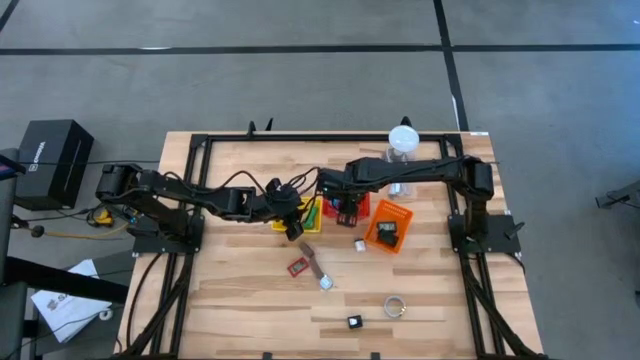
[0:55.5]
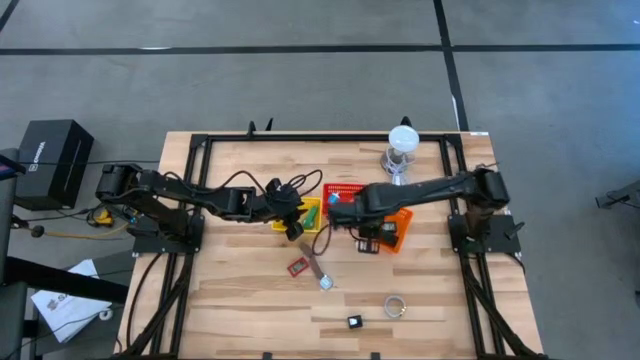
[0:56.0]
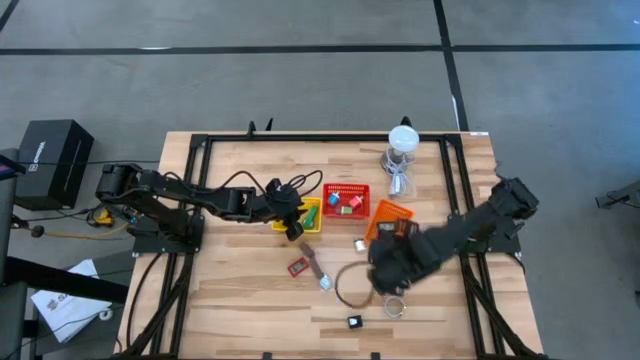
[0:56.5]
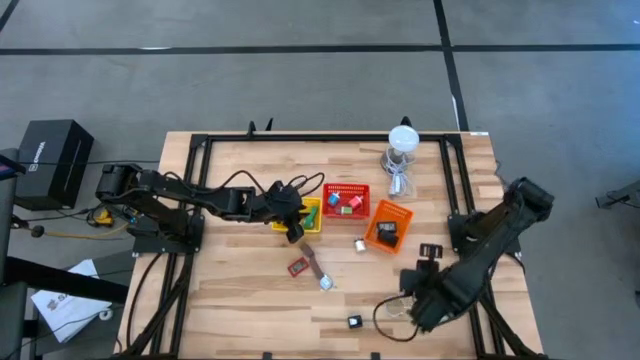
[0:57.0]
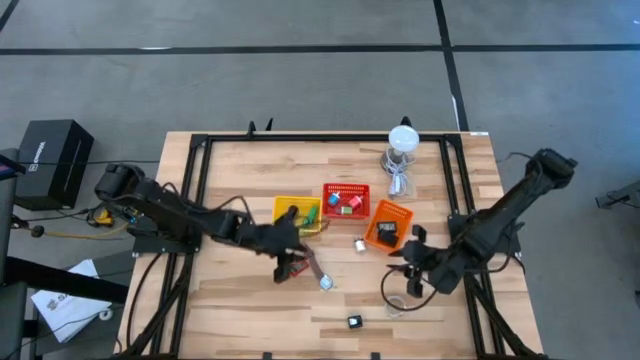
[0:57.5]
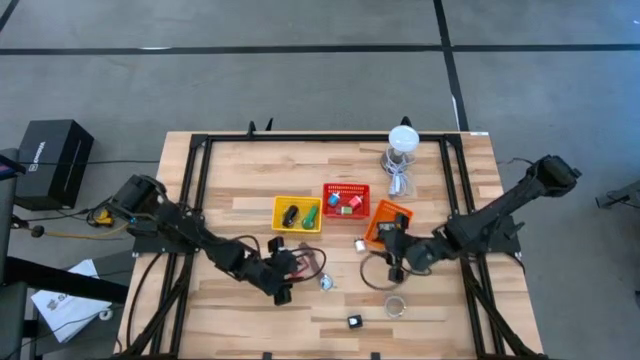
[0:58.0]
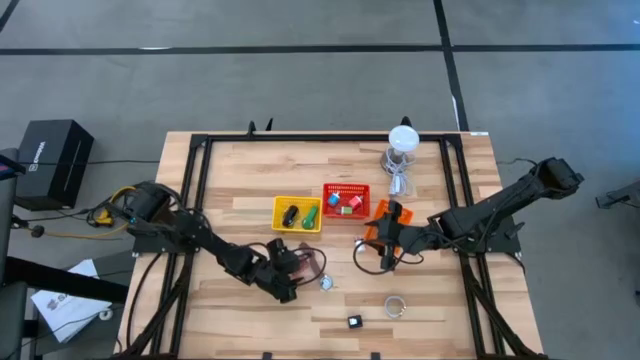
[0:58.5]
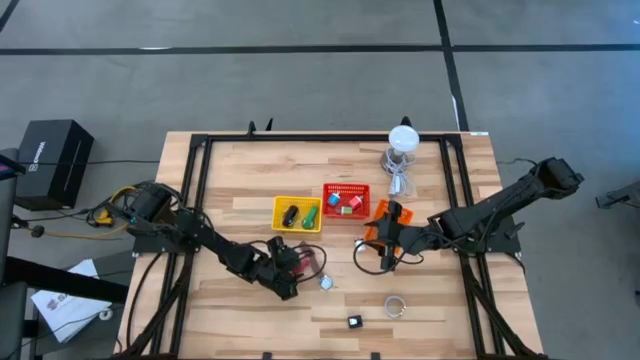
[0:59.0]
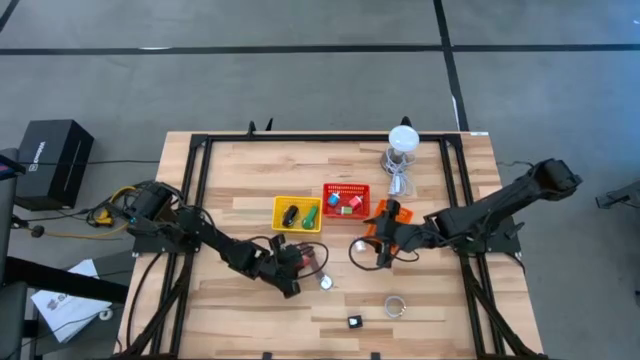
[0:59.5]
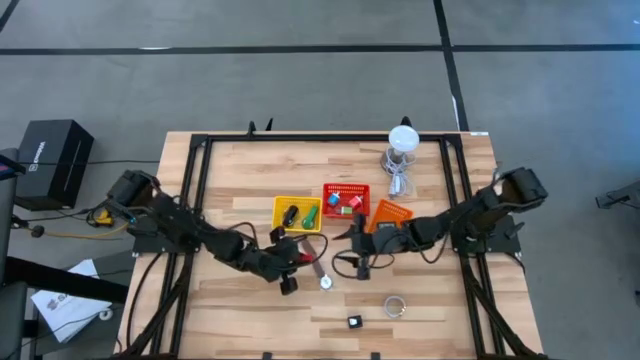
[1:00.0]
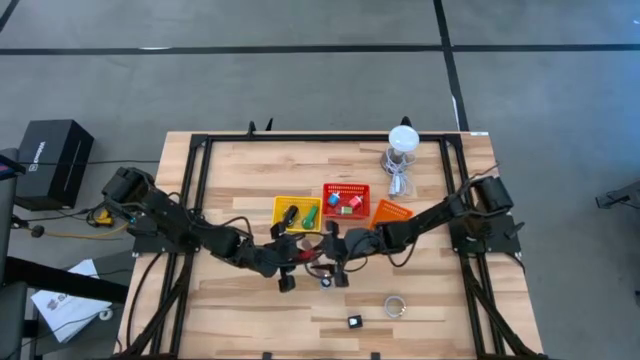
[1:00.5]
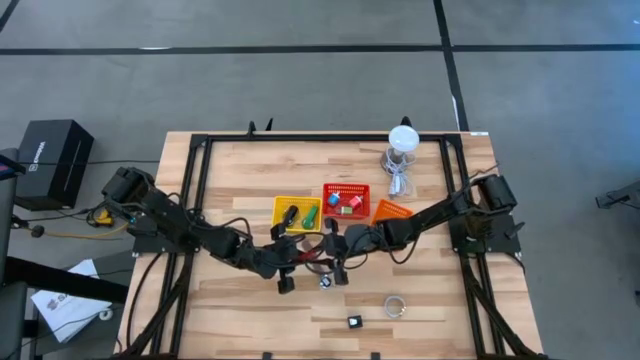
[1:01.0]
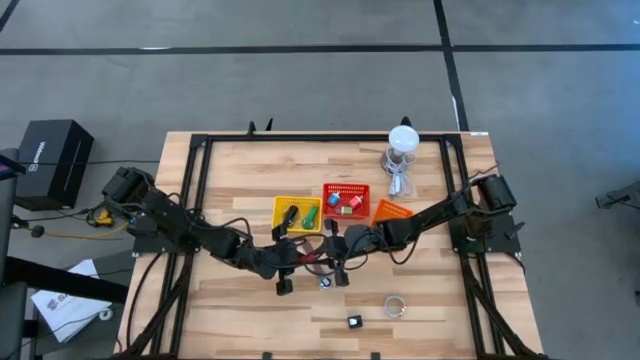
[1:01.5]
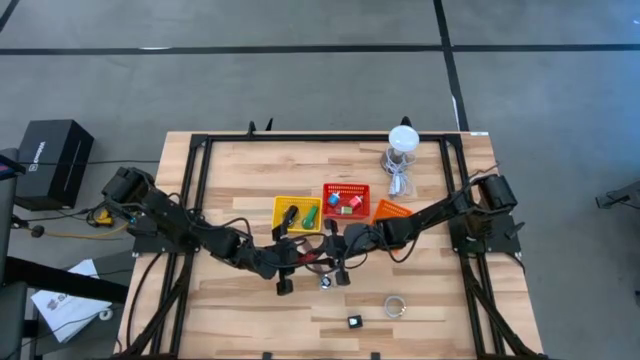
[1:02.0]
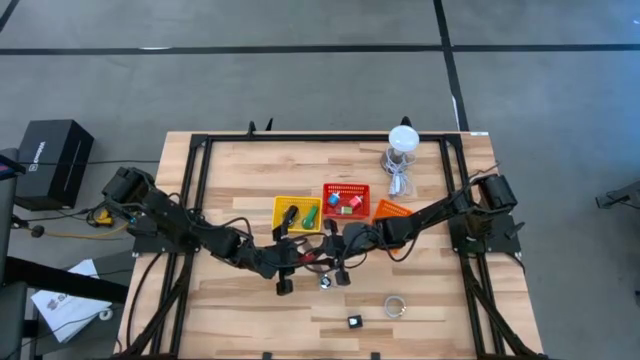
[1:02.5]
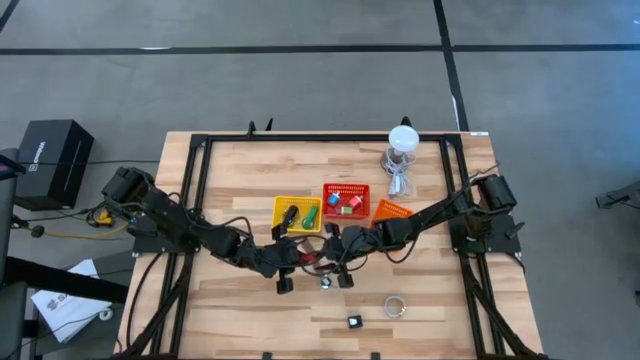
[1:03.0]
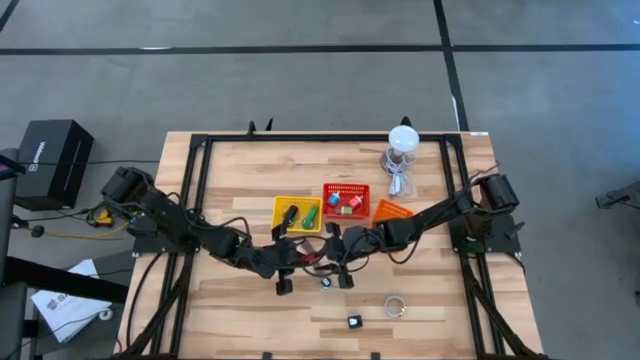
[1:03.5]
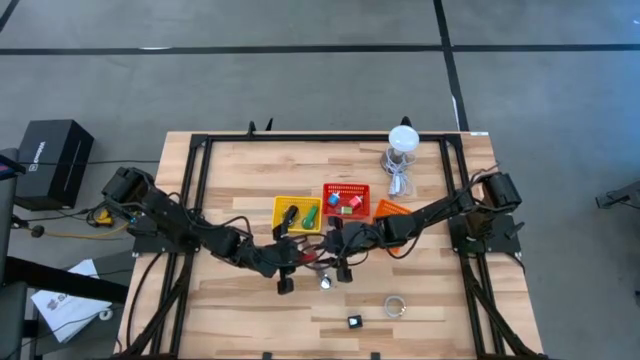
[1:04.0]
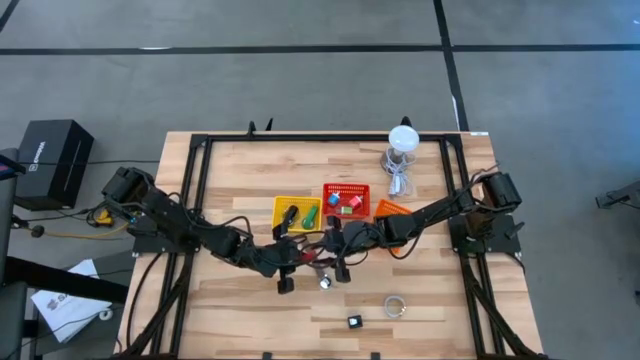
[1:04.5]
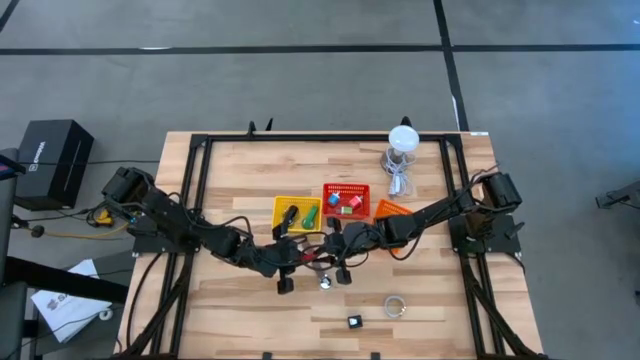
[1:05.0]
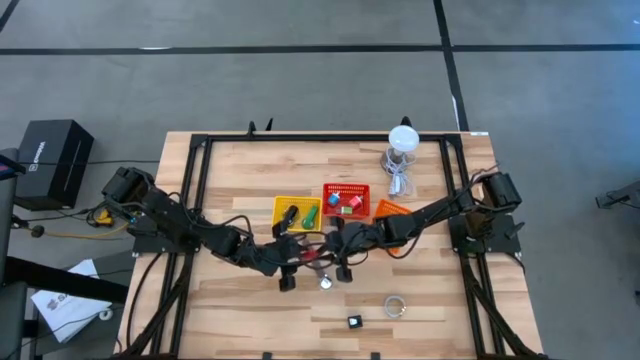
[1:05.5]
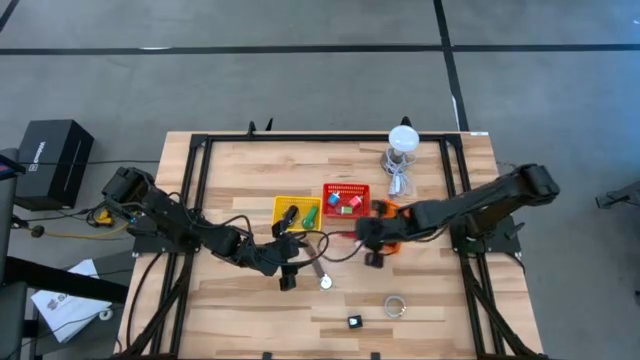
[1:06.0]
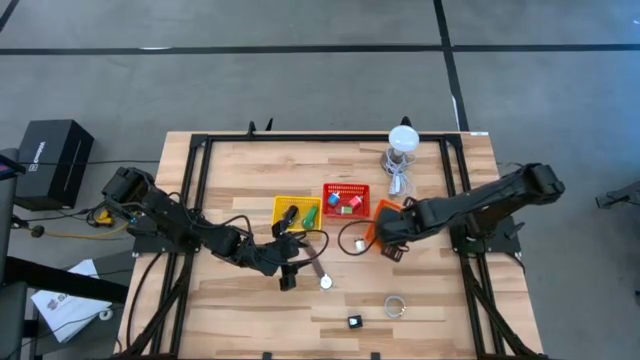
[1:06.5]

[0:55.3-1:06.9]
Task: Pick & Place Office items
Put the red digital clock into the orange bin

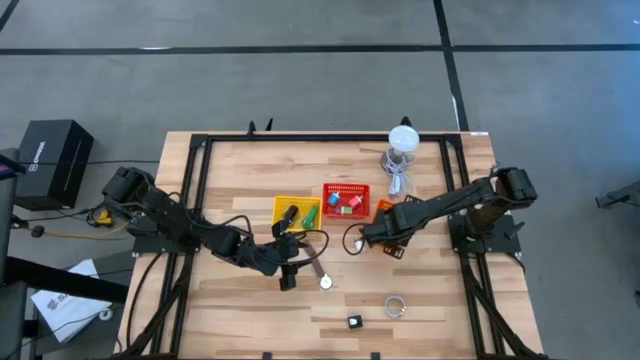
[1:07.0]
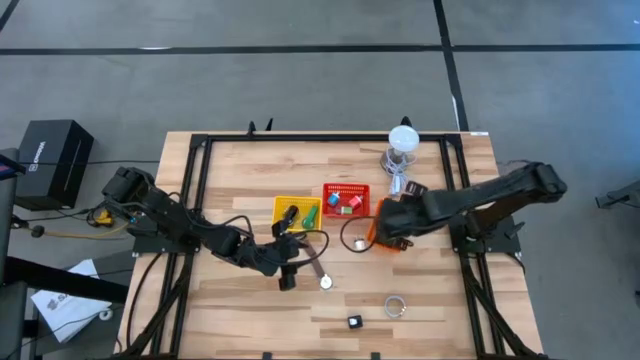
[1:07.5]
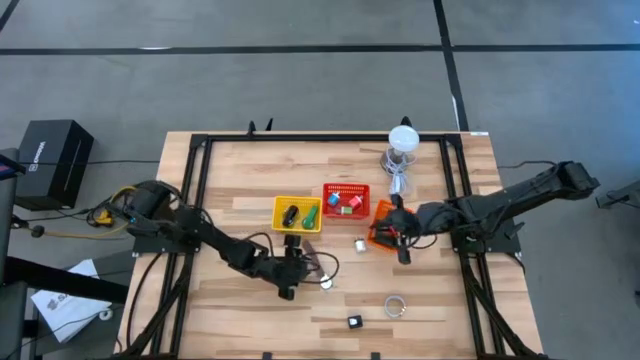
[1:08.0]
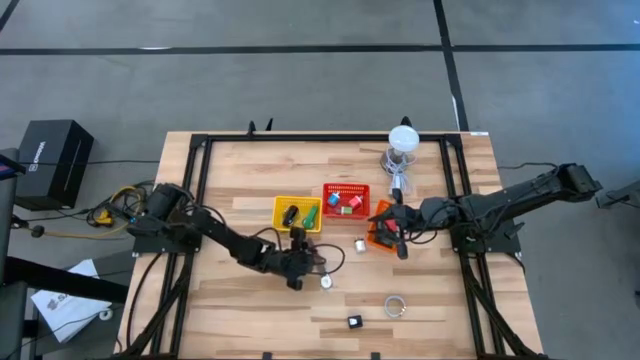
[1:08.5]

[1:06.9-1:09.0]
Put the brown watch into the yellow bin

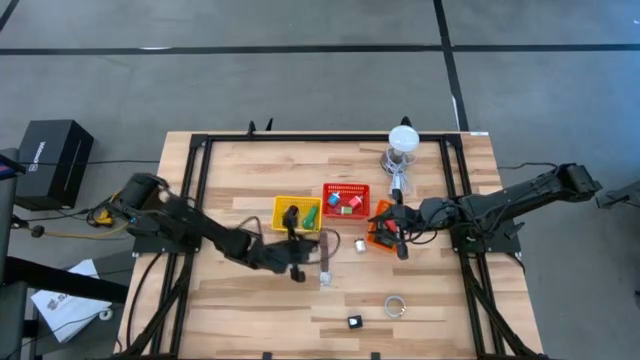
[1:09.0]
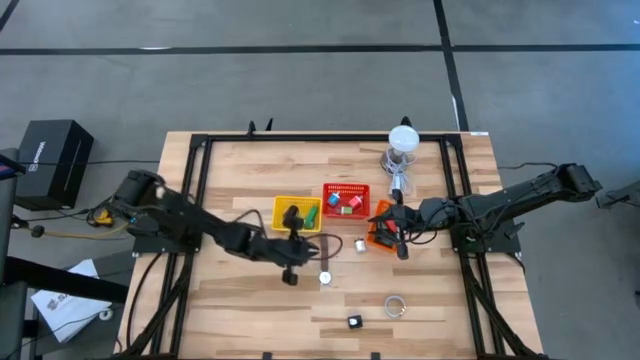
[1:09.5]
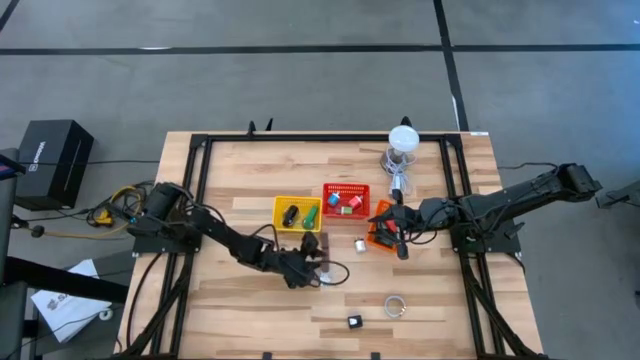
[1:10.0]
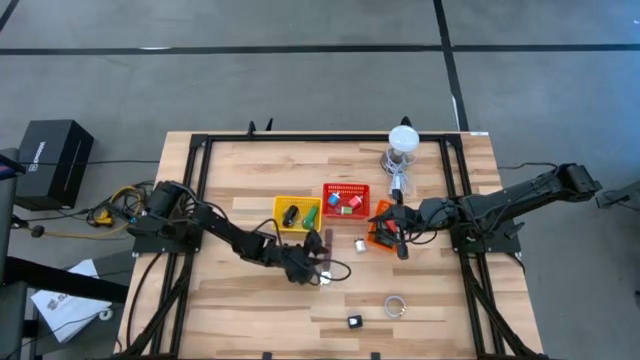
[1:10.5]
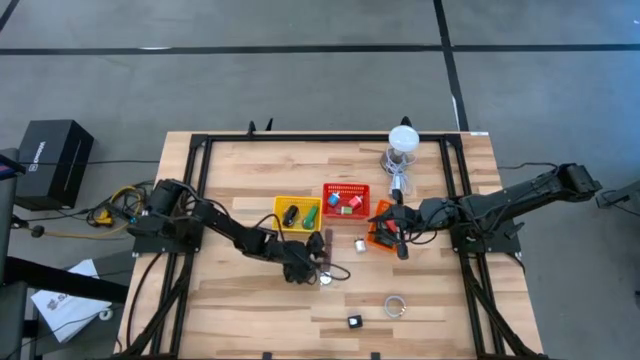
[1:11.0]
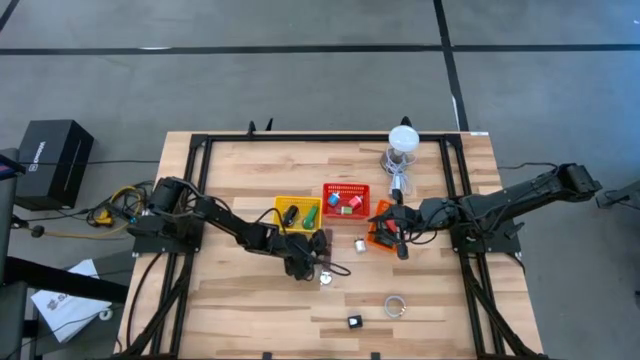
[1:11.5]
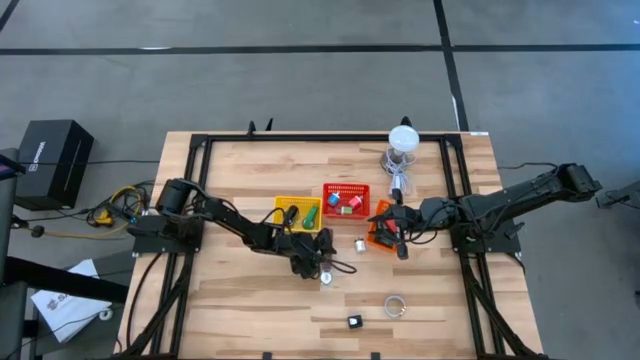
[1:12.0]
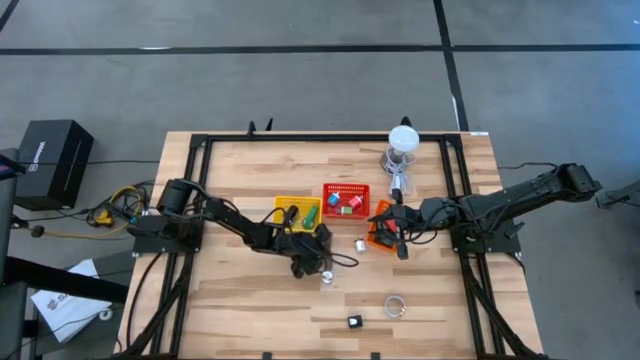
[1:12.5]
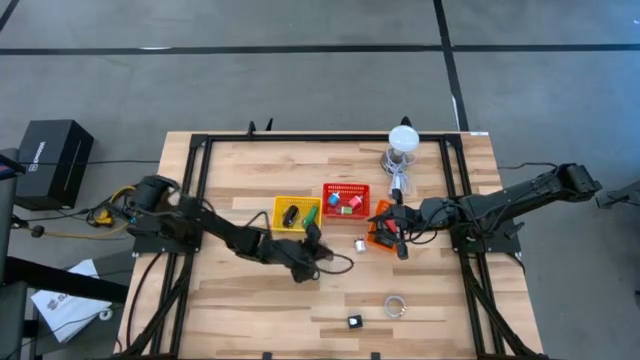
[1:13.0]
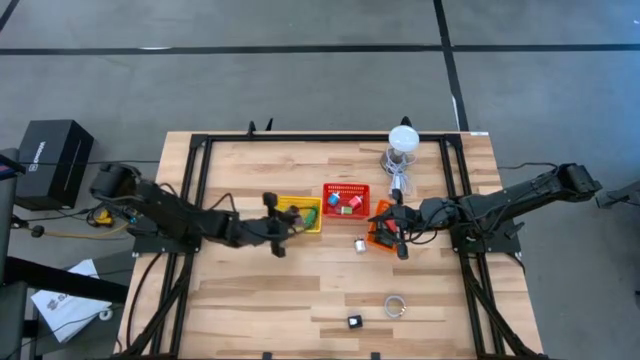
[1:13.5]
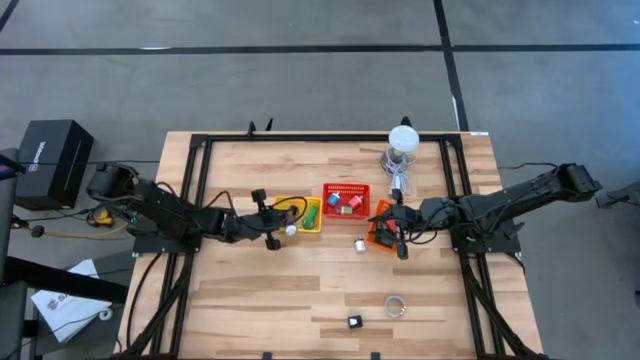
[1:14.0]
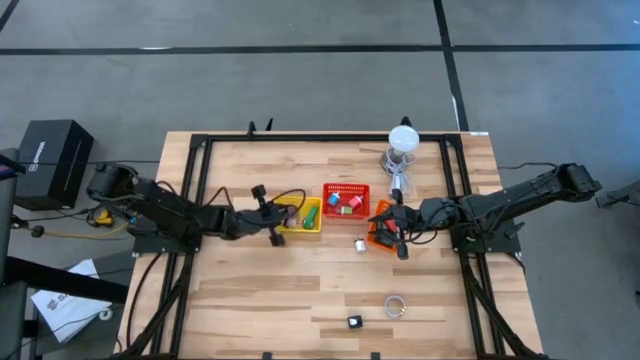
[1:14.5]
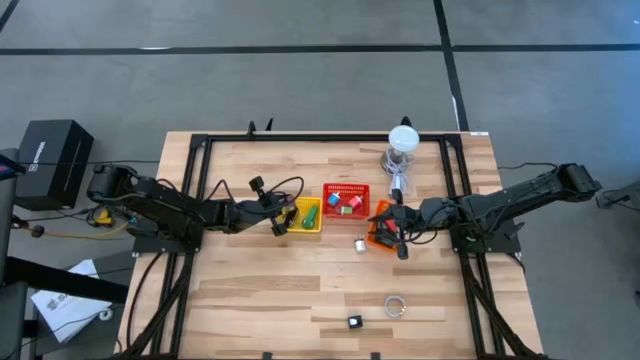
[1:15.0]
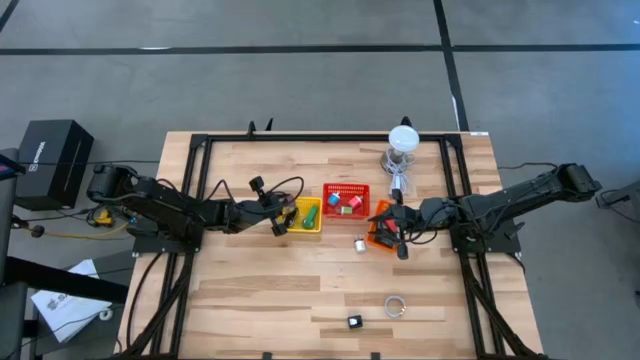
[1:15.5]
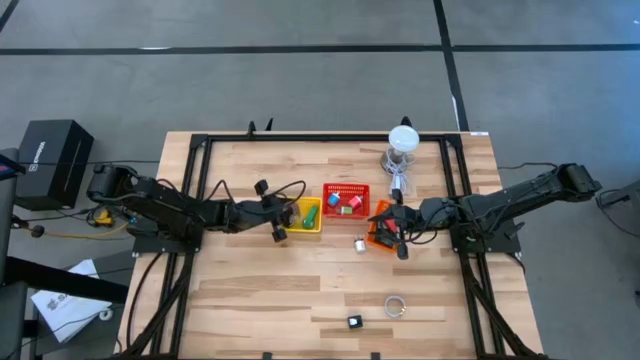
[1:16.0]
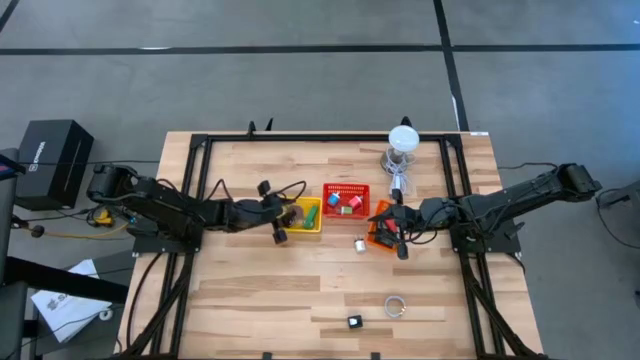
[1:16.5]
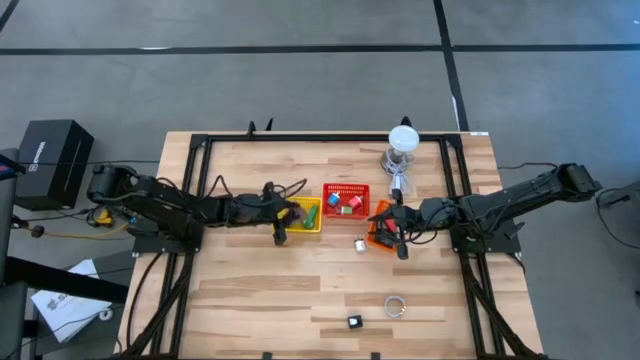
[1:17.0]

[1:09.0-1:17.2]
Put the brown watch into the yellow bin
